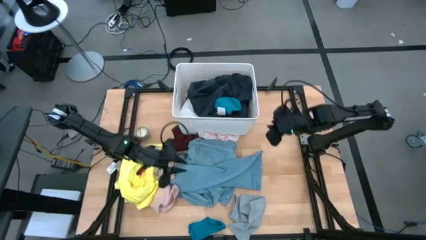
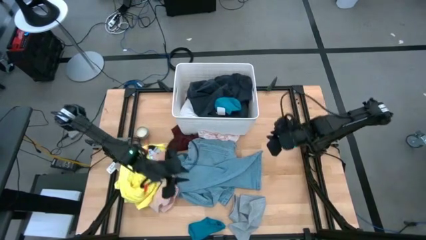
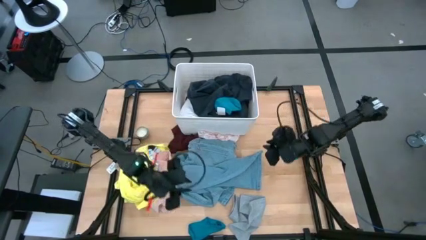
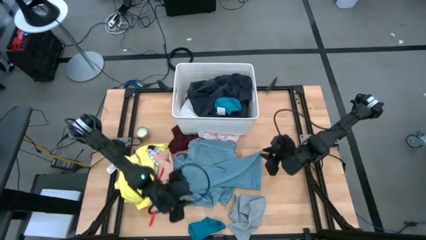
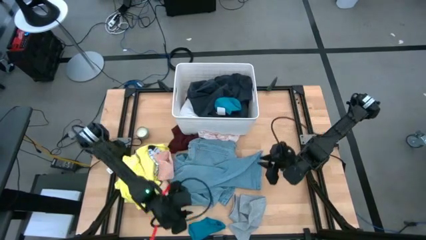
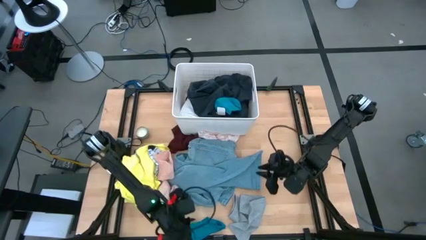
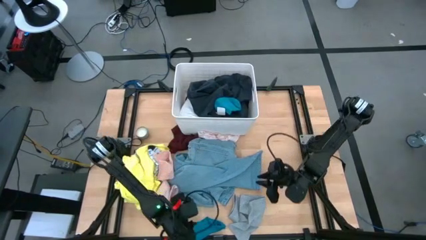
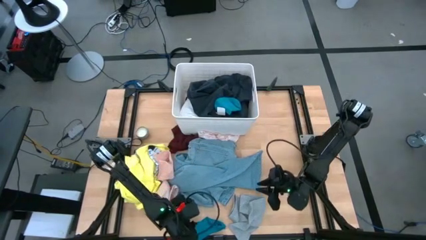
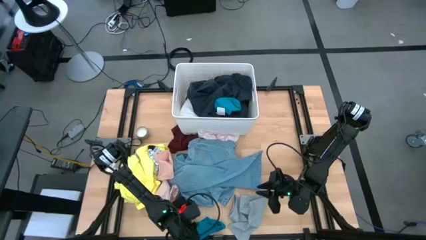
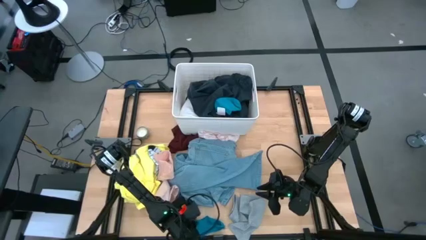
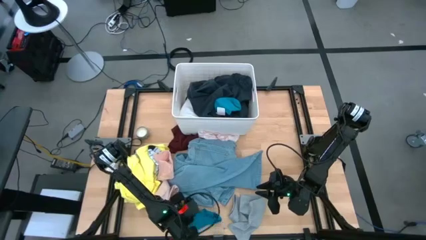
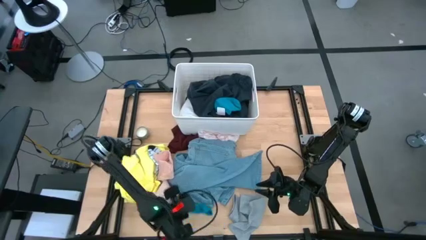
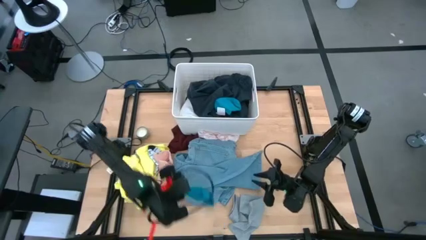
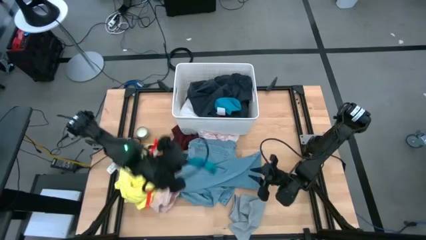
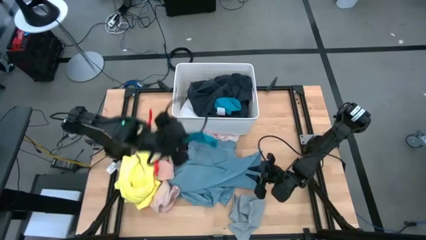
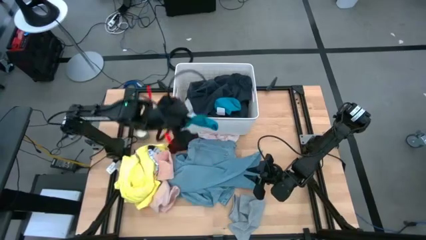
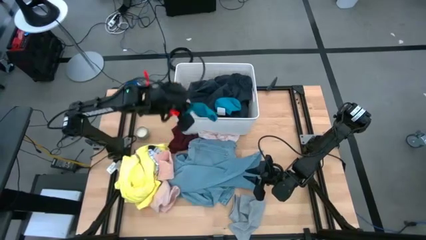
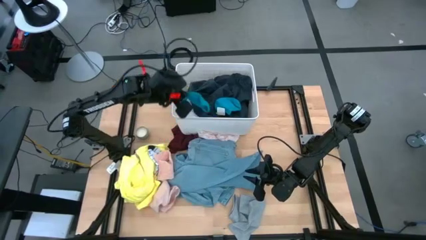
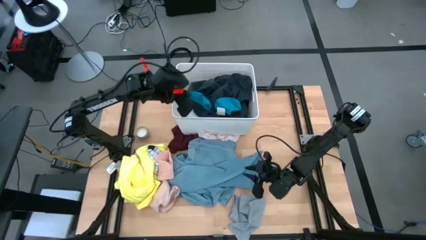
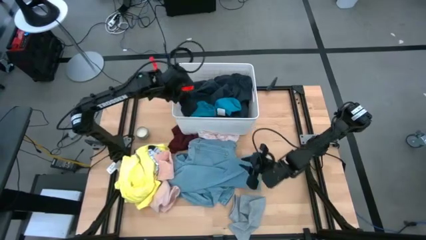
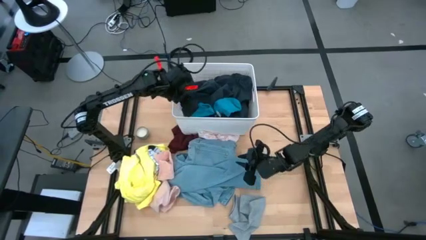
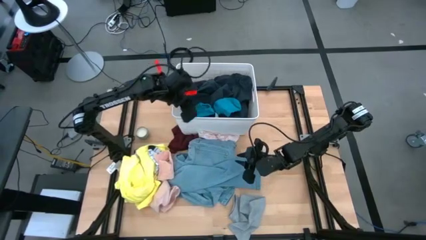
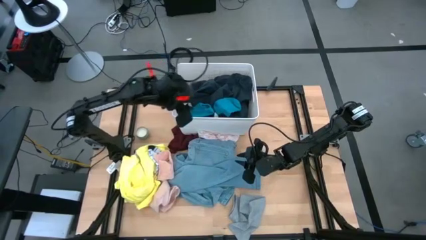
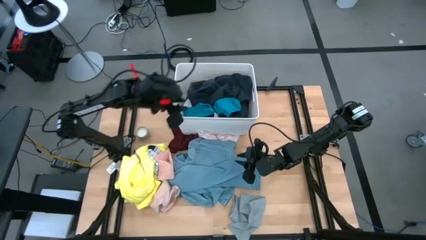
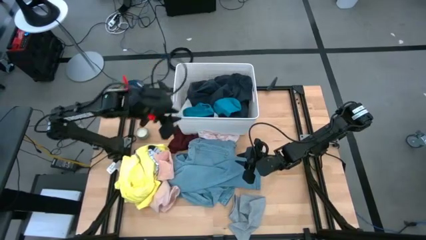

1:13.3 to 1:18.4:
Task: Sort clothes
Put the blue sock into the white laundry bin

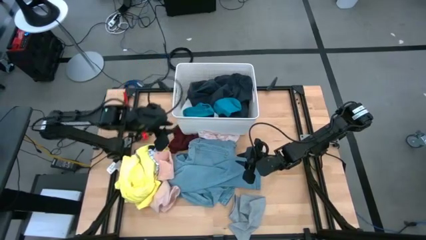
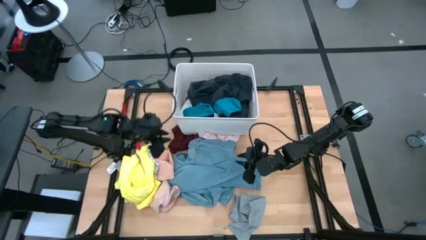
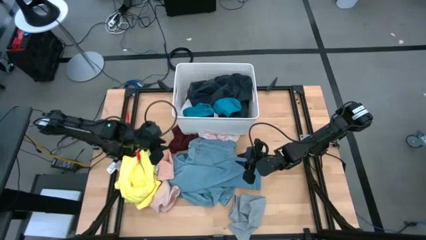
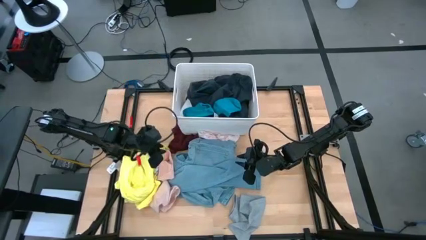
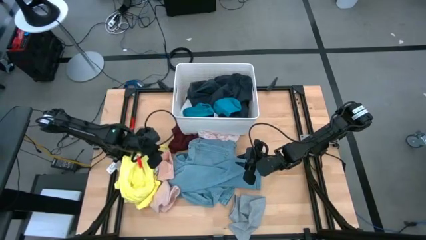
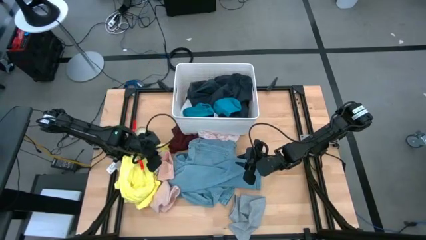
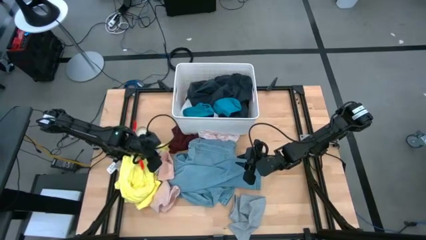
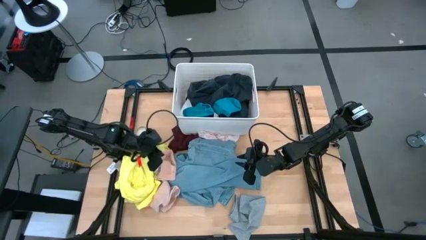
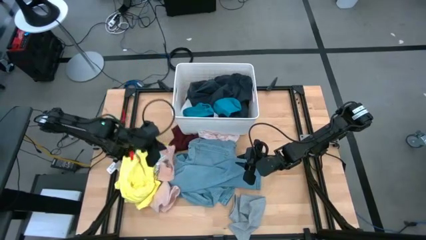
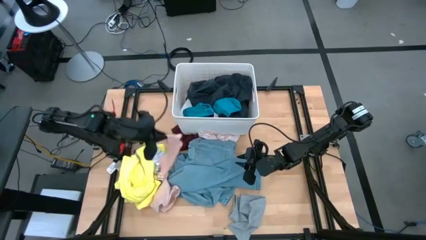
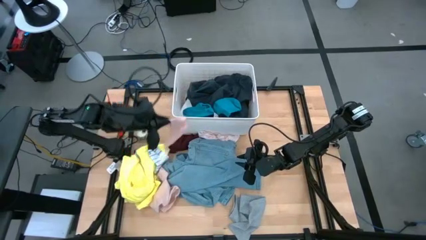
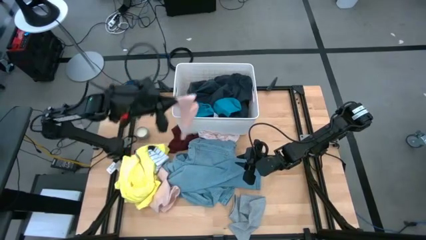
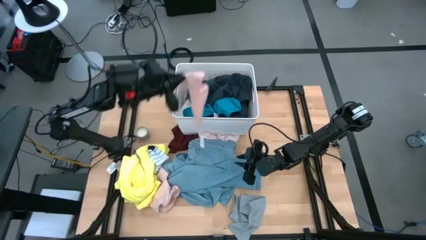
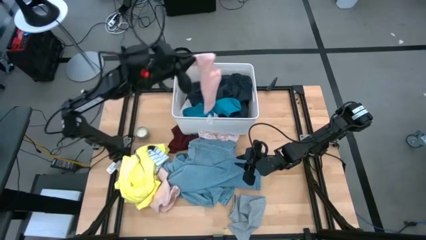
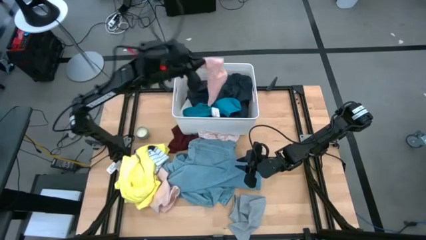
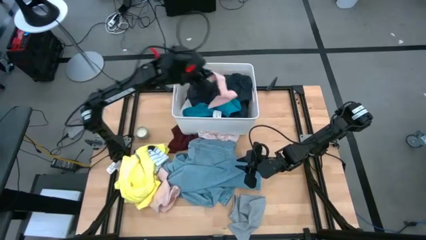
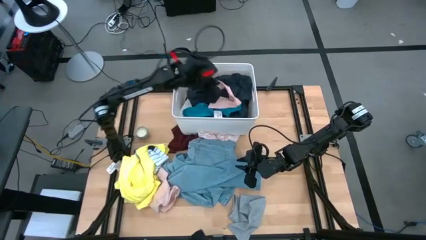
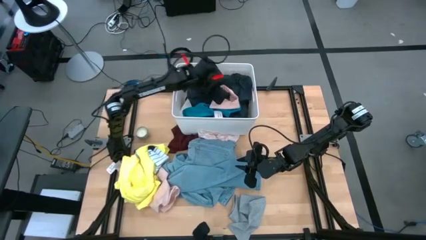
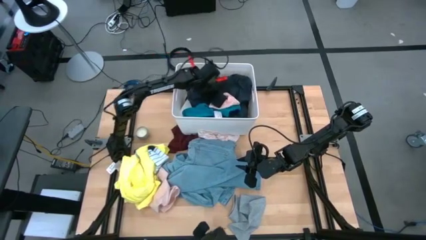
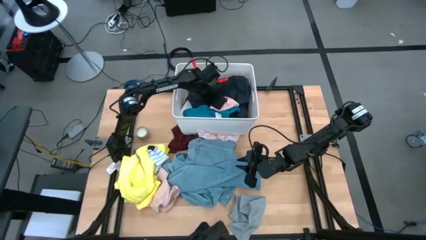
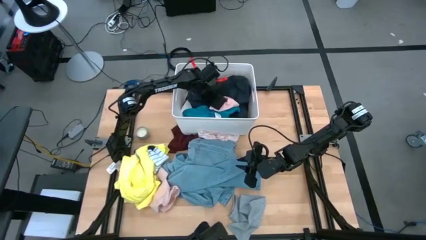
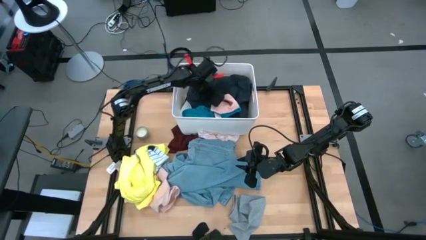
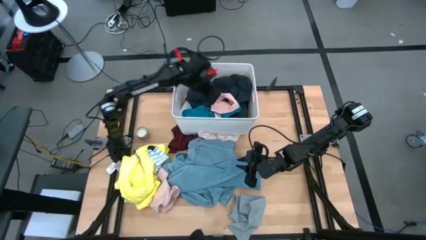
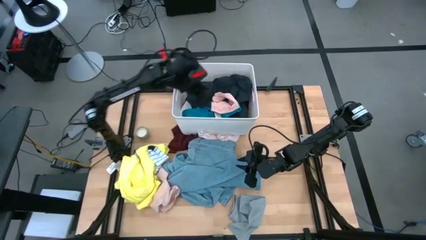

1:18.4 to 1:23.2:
Put the pink sock into the white laundry bin

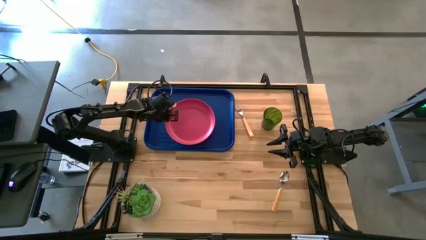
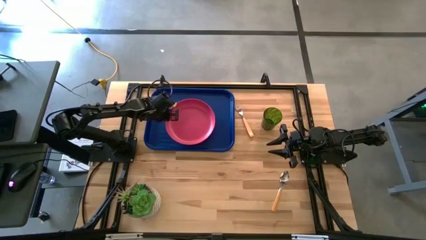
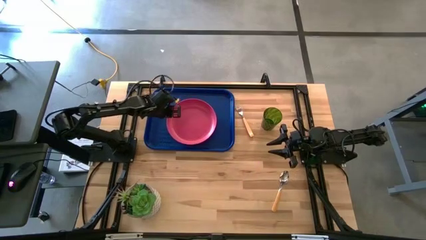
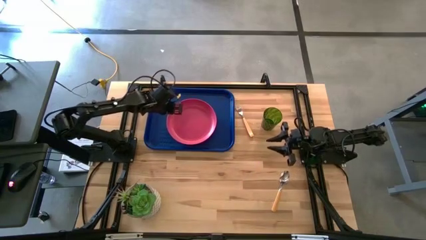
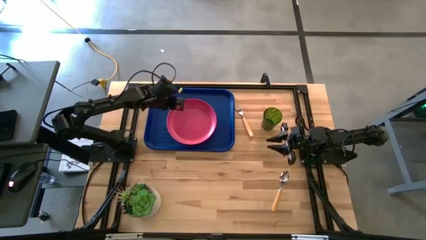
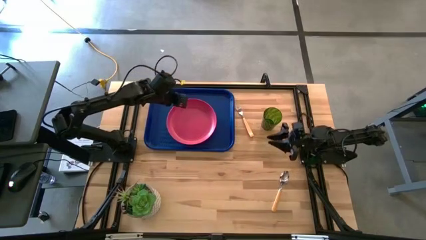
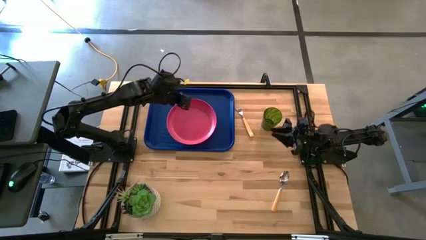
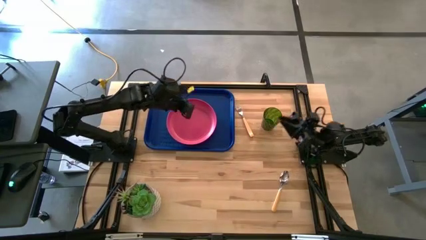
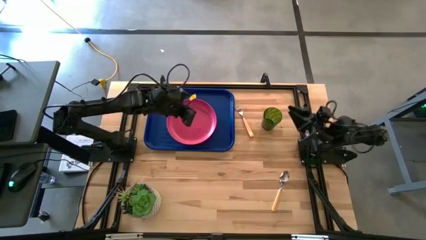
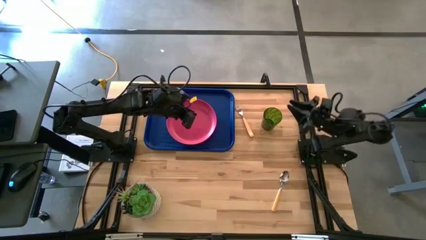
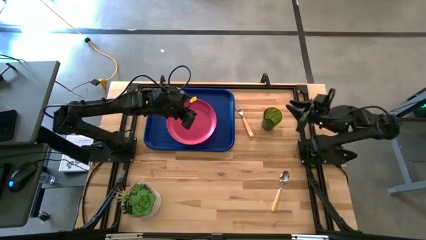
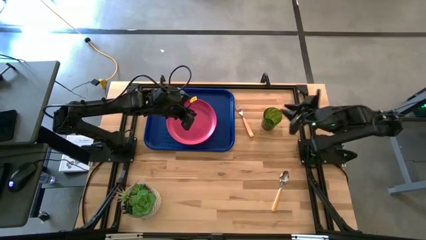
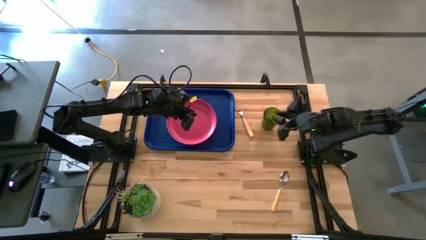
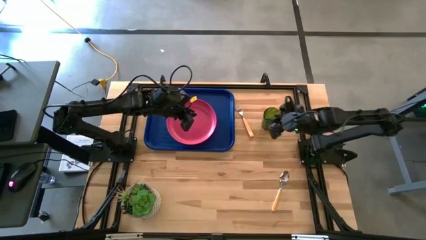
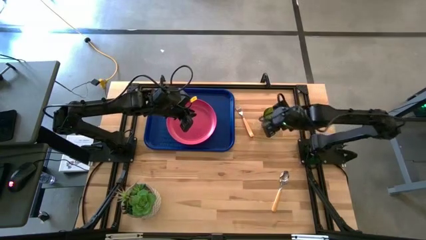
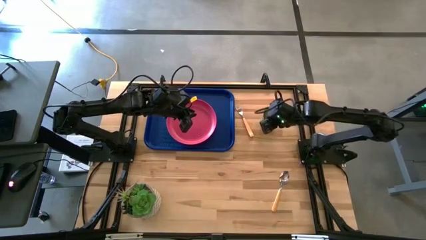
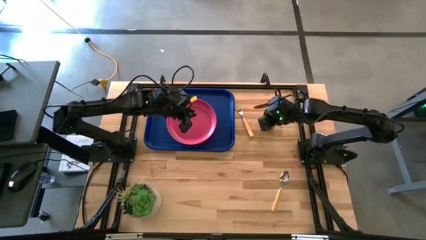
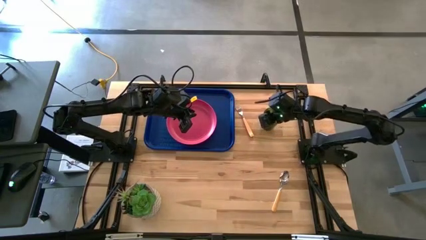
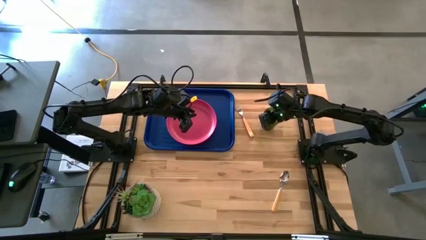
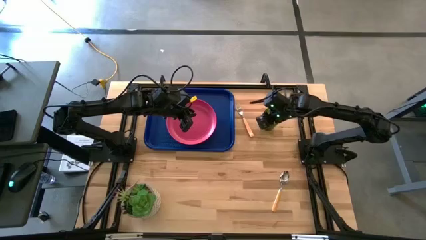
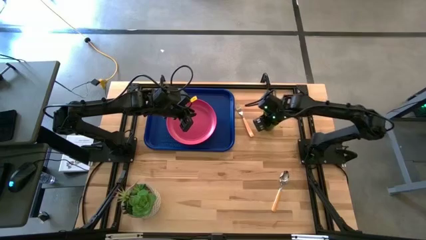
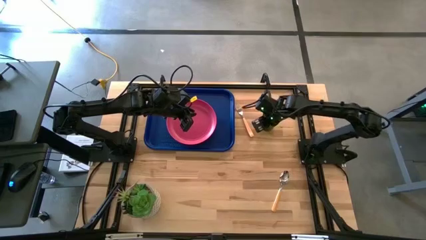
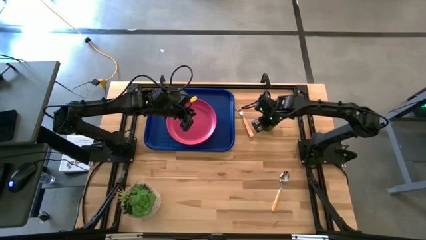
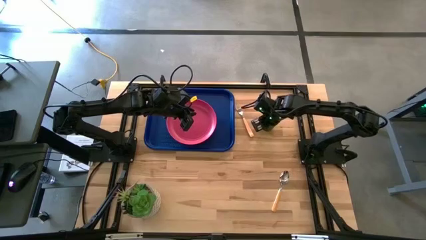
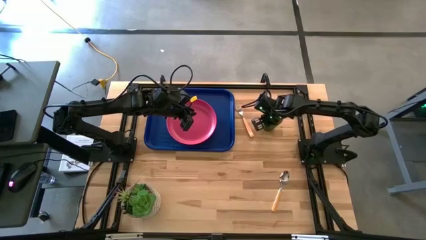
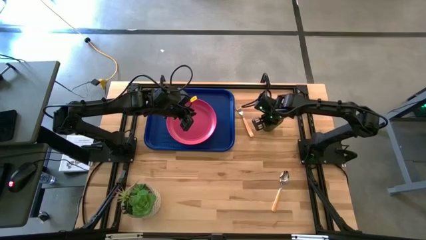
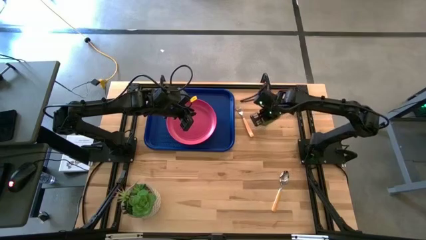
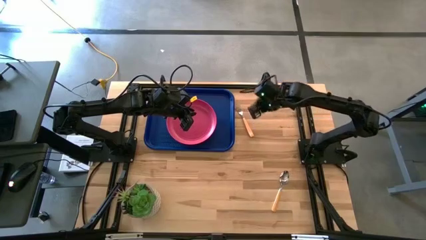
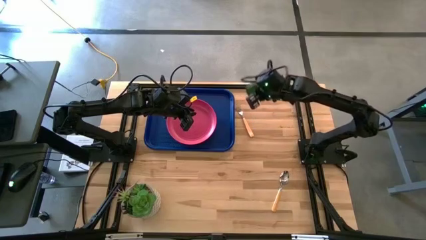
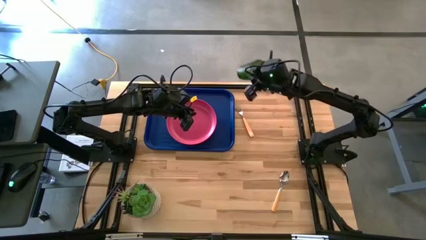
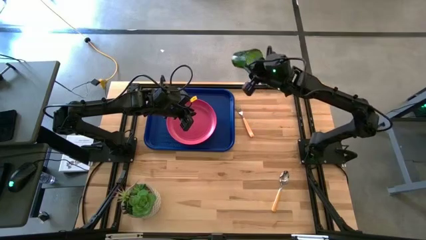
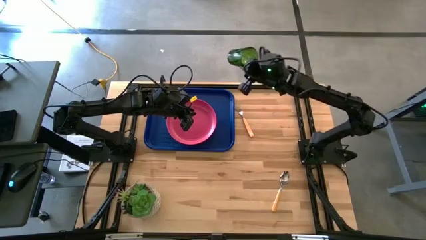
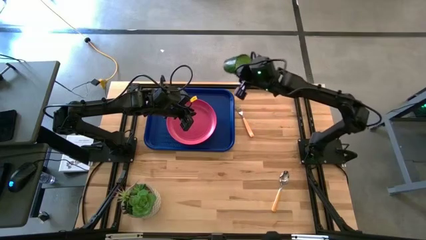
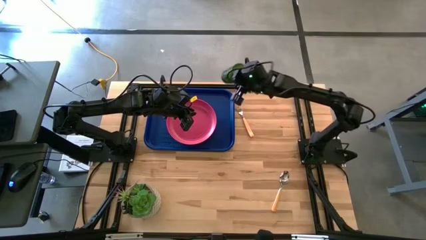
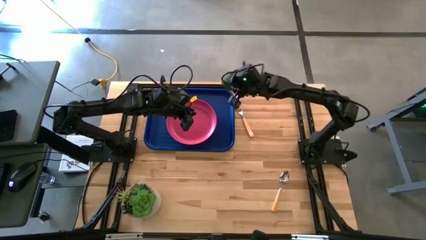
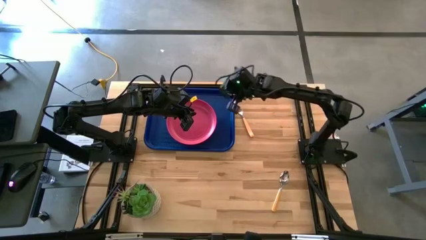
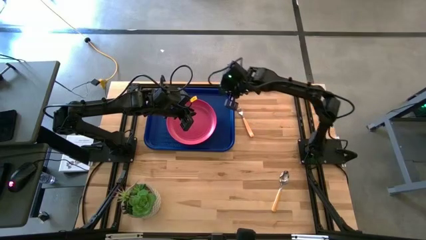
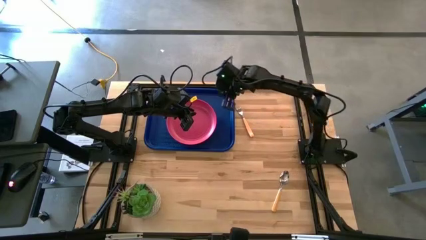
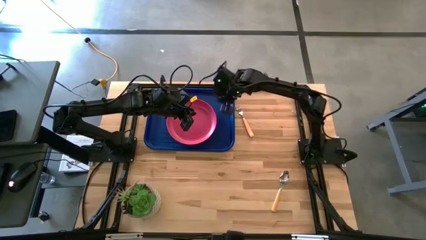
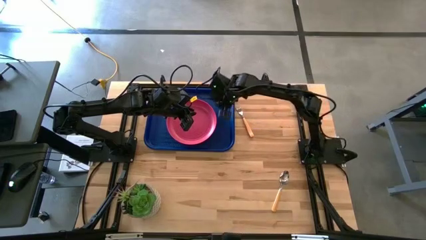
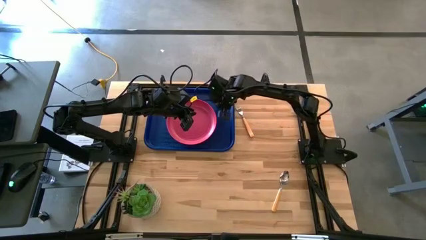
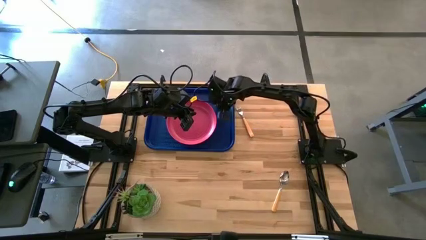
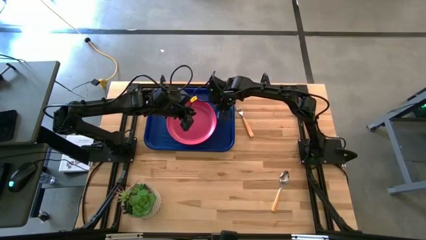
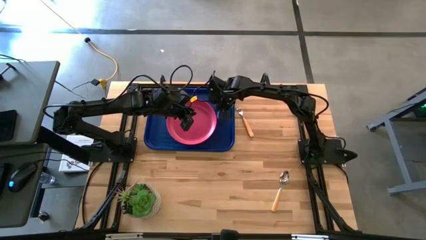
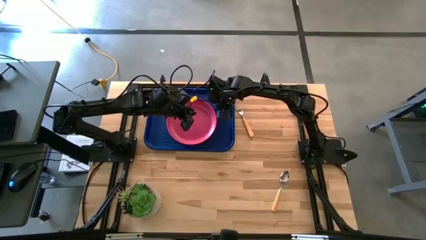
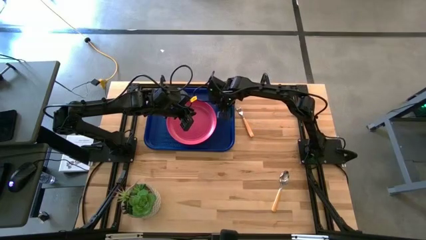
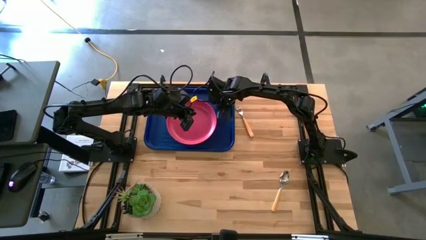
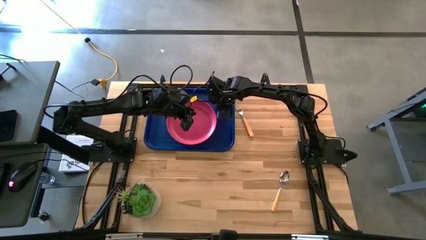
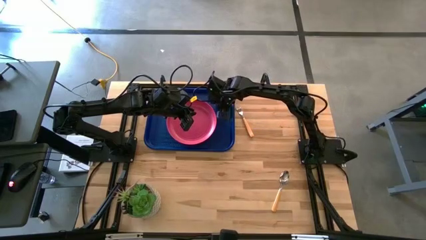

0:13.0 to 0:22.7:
Task: Pick and place plate/cup/fork/spoon on tray
Put the green glass to the right side of the pink plate on the blue serving tray
